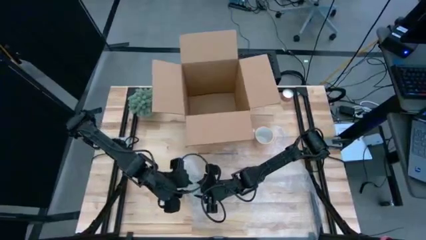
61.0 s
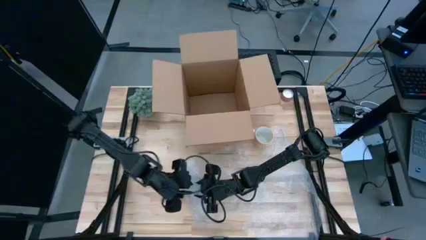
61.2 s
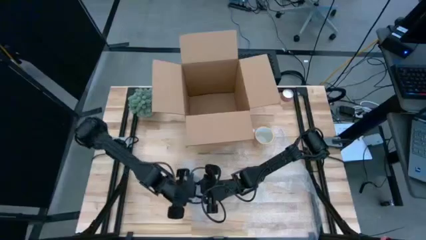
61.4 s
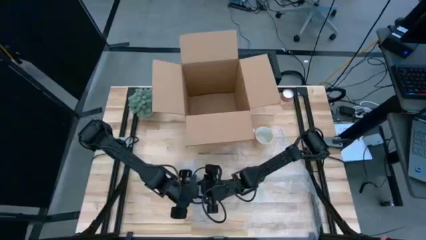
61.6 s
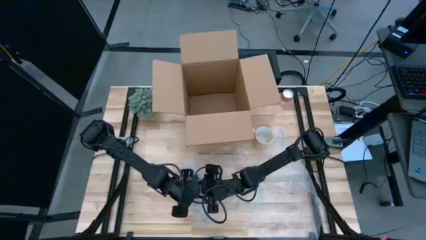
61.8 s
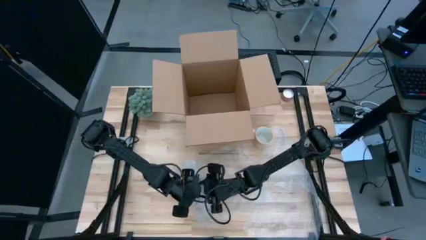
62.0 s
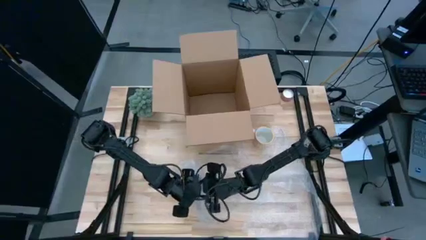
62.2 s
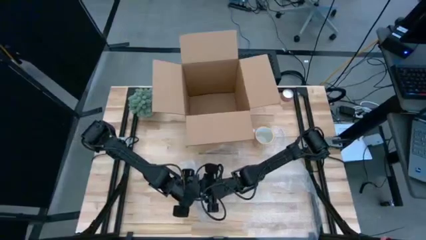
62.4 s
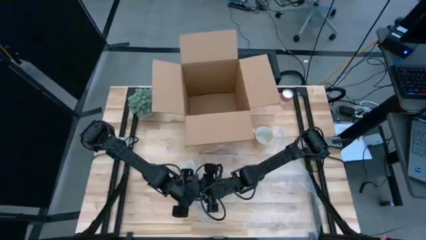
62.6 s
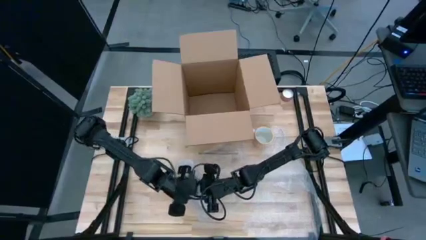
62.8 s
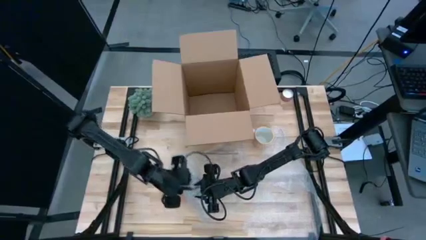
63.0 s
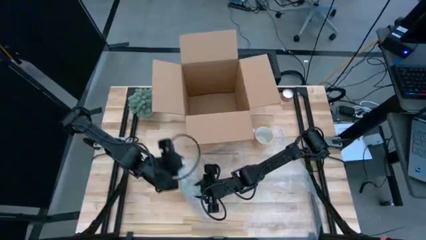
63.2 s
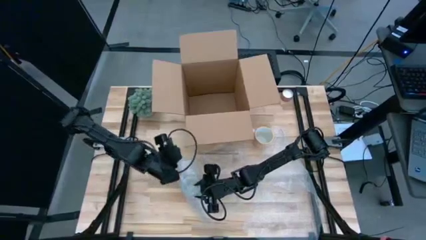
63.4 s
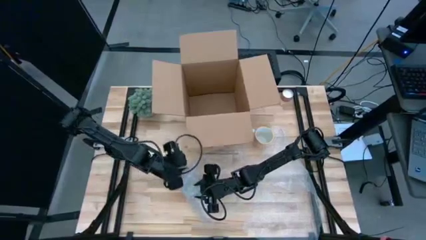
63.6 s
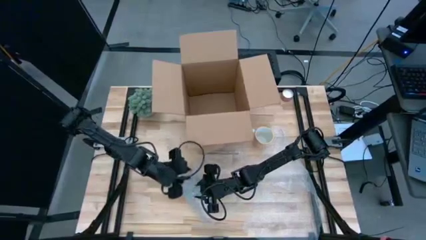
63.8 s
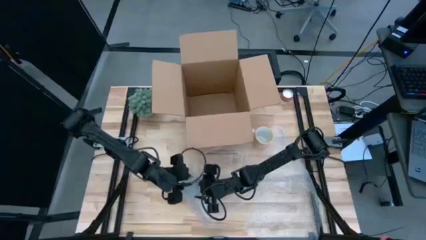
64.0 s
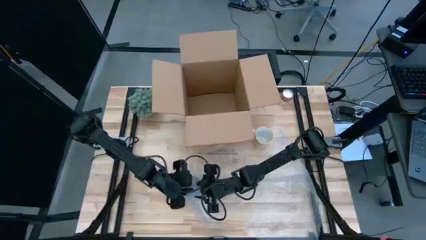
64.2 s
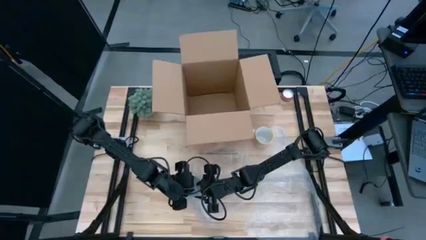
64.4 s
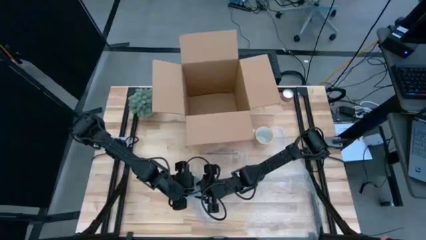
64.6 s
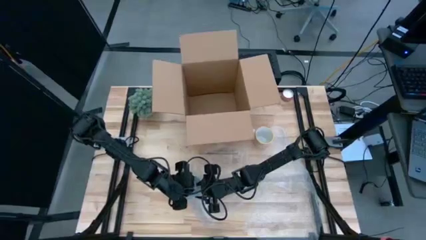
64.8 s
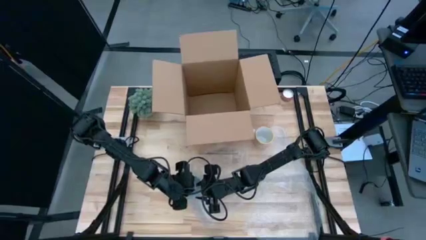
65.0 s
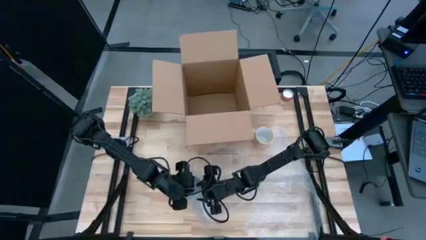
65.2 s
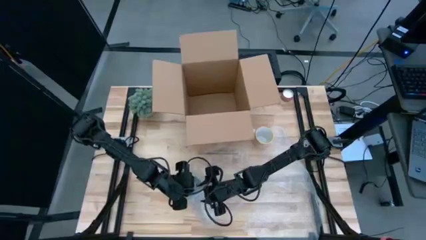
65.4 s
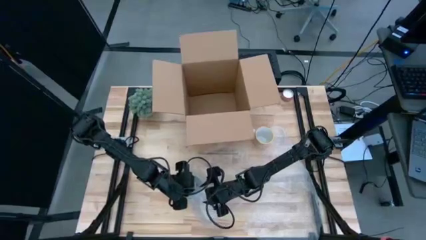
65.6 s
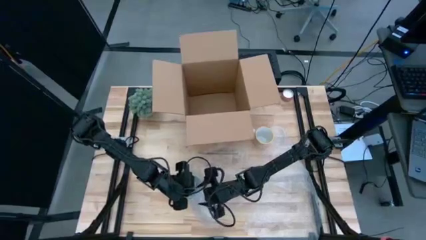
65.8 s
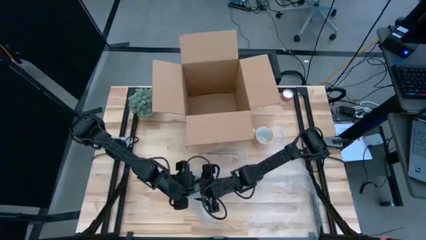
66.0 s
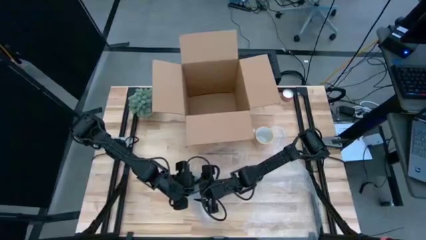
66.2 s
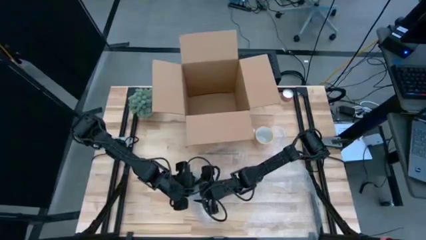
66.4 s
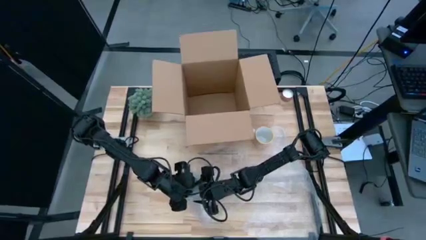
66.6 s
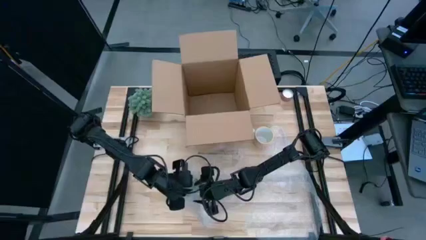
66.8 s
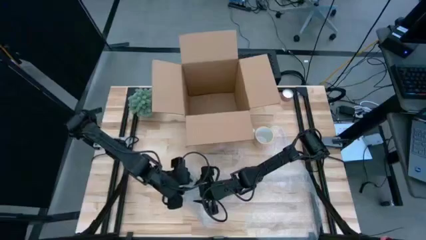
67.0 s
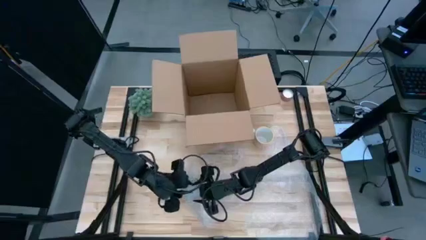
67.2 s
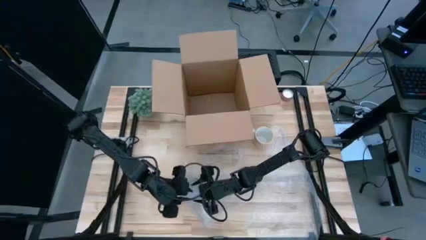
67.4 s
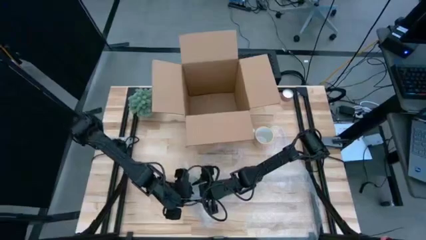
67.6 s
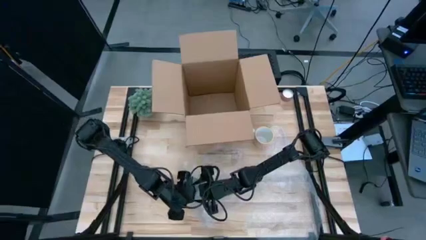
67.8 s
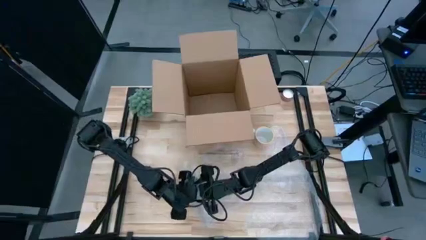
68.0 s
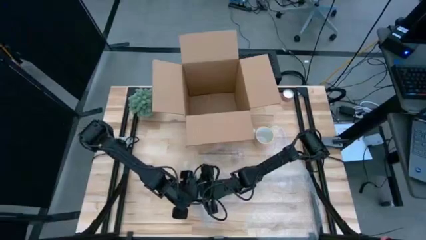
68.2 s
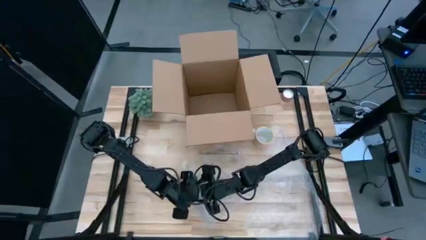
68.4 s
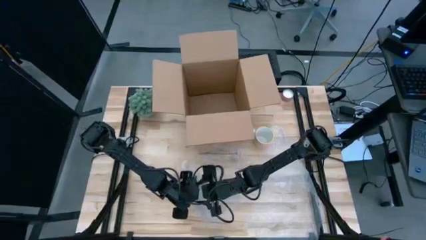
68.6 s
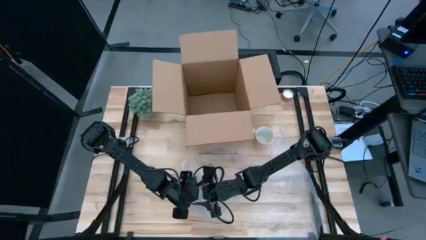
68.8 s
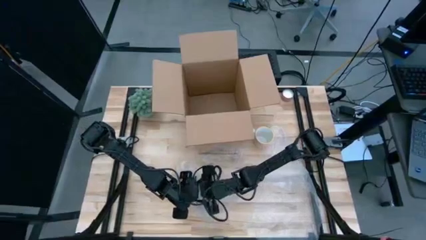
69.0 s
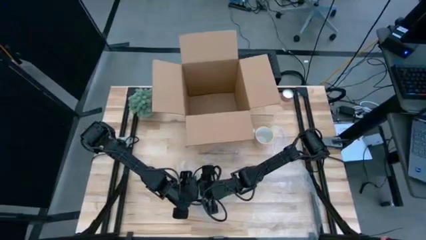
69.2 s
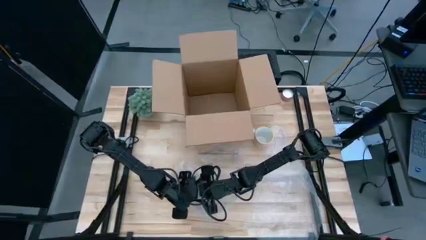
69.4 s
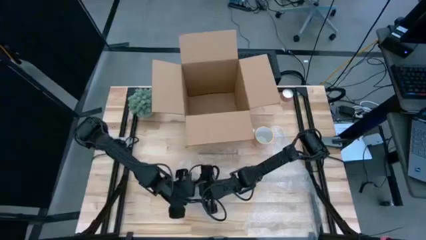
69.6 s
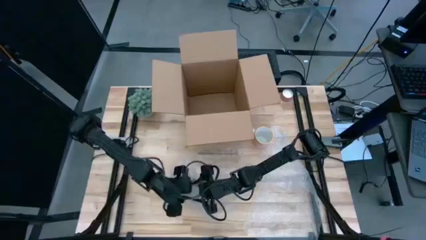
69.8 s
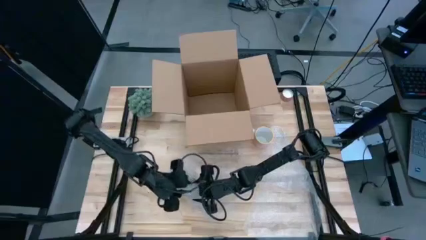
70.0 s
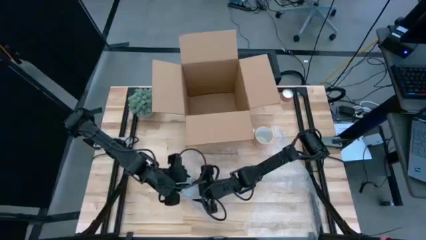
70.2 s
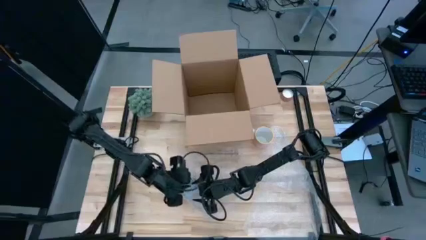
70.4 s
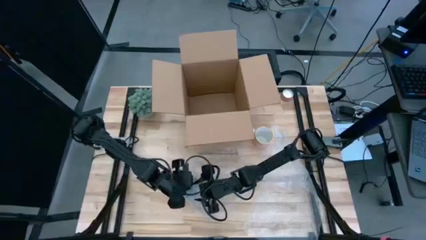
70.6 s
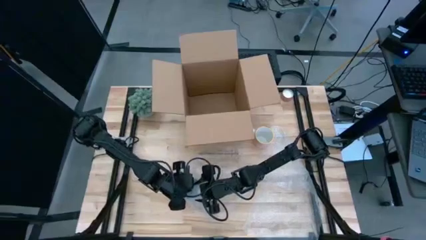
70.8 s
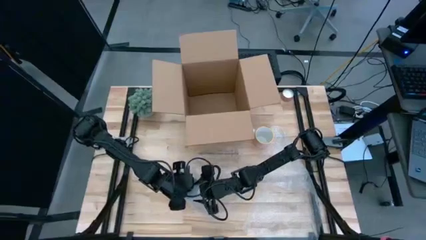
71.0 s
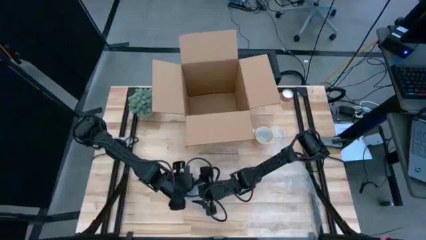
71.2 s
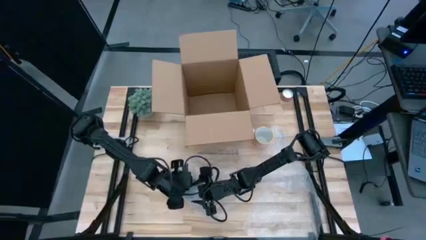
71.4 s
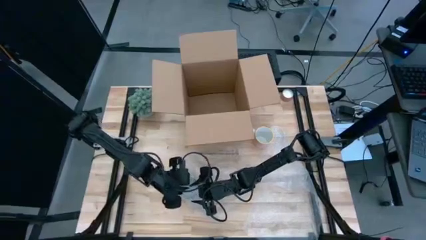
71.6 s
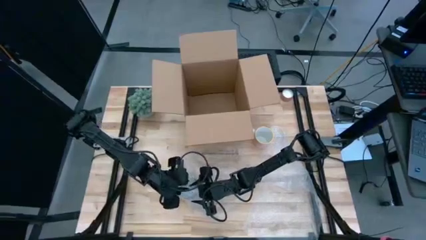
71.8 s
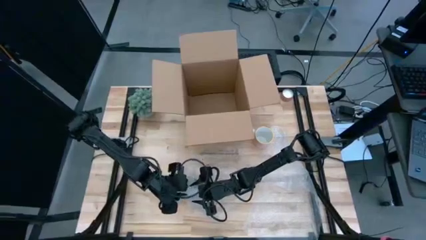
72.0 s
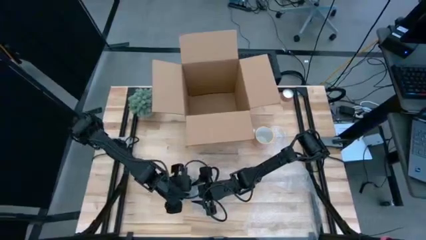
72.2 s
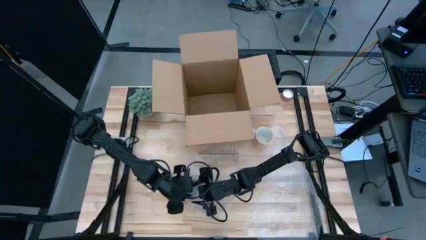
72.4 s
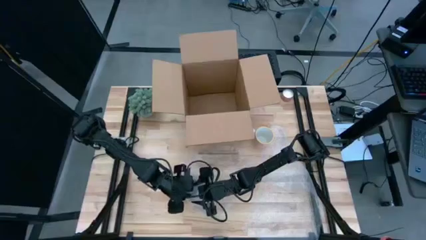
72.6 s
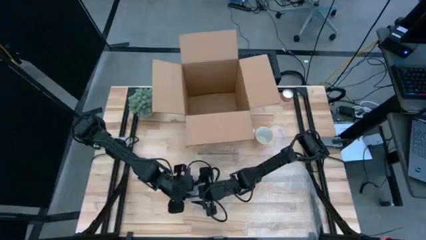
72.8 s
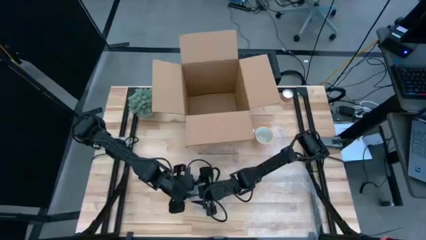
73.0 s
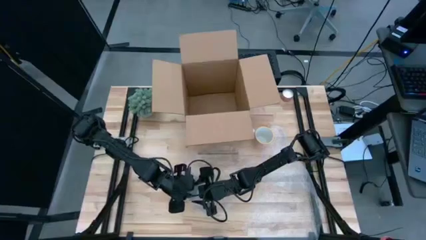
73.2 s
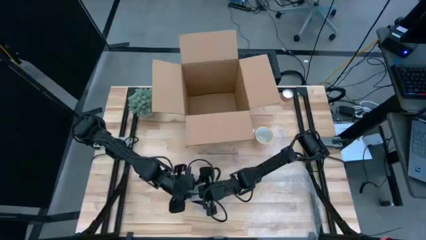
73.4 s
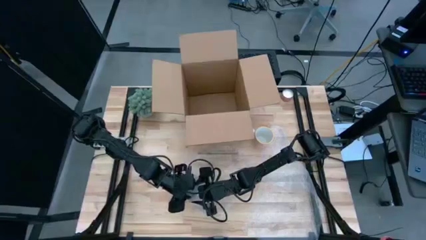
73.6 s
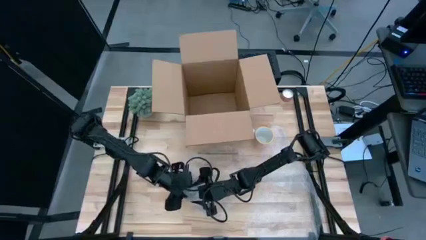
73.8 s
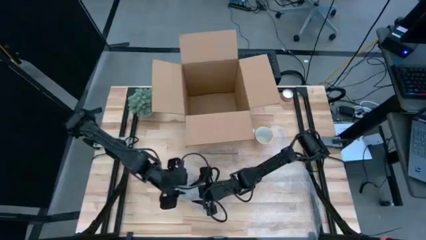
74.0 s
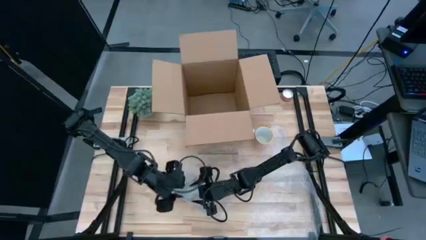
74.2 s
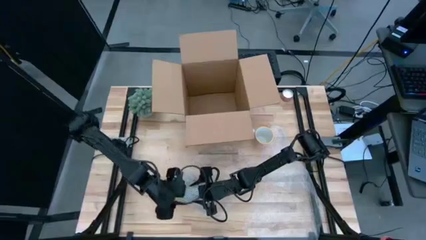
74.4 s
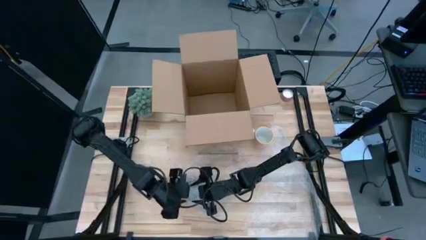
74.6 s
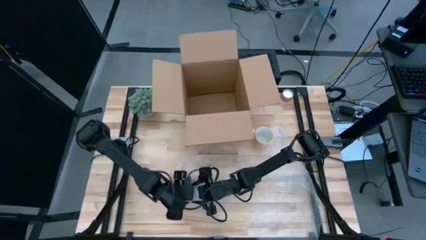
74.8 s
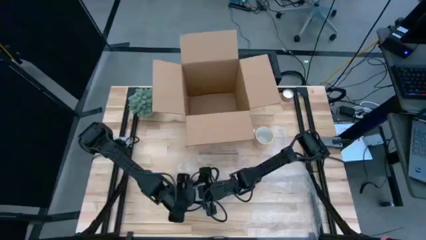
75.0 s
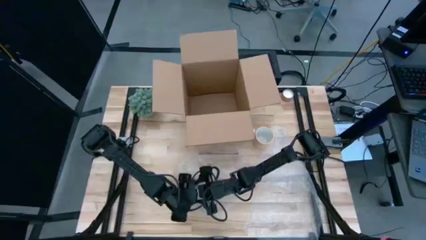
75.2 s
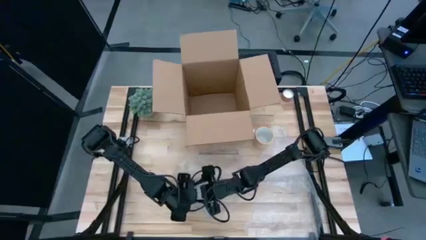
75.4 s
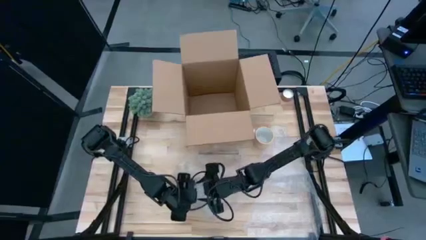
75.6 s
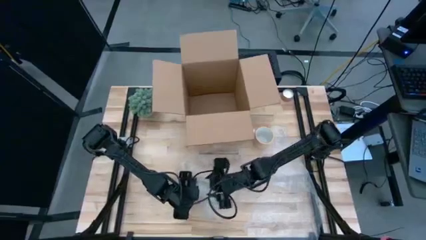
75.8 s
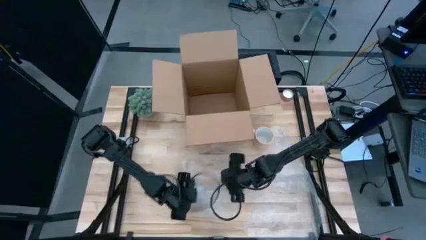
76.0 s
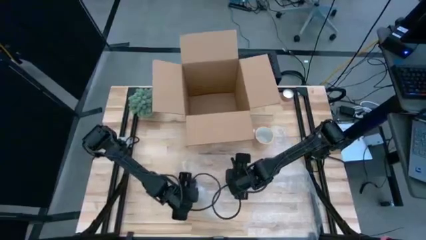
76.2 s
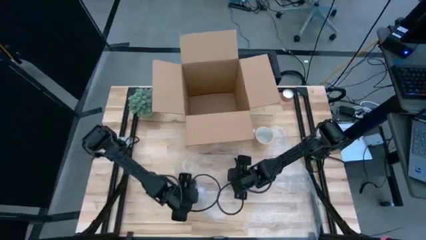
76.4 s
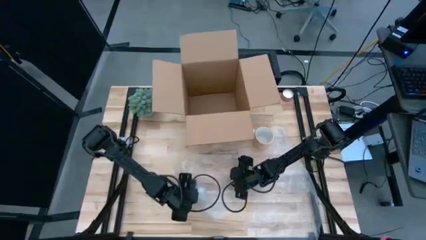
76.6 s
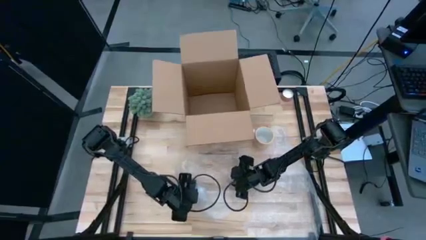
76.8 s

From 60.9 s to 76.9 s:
Task: wrap mug
Wrap the red cup in the bubble wrap
